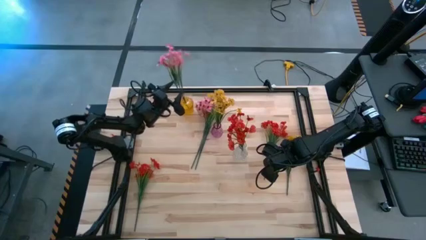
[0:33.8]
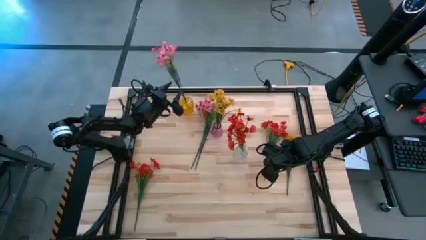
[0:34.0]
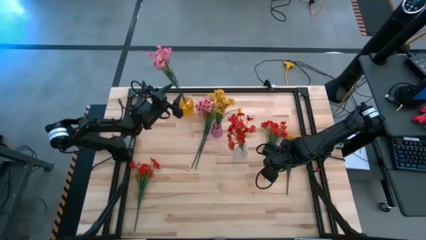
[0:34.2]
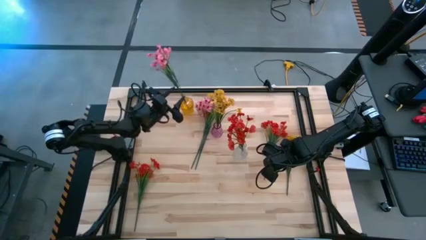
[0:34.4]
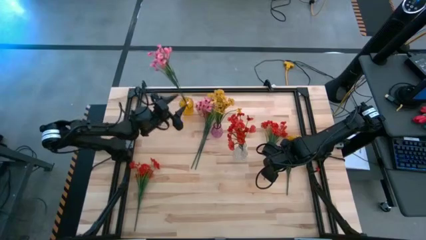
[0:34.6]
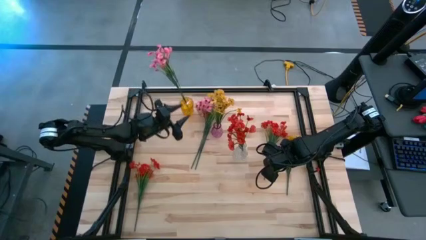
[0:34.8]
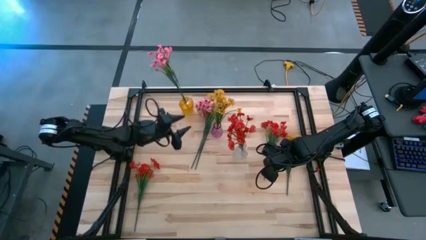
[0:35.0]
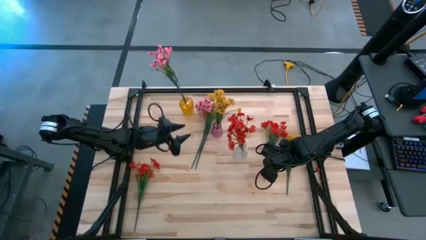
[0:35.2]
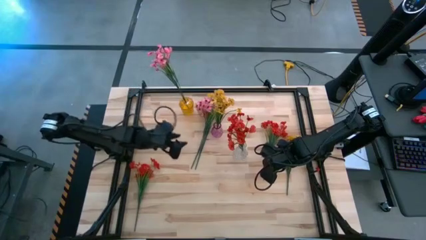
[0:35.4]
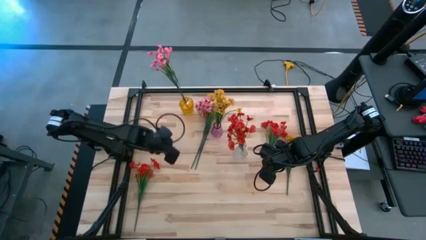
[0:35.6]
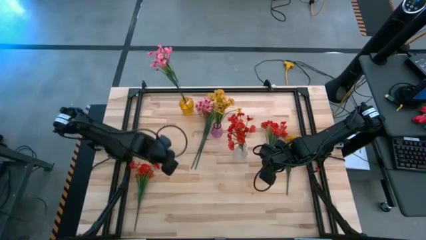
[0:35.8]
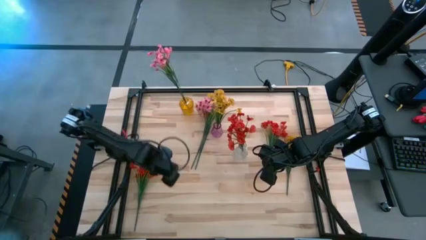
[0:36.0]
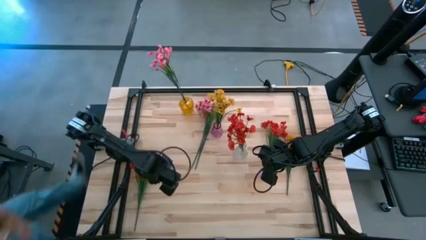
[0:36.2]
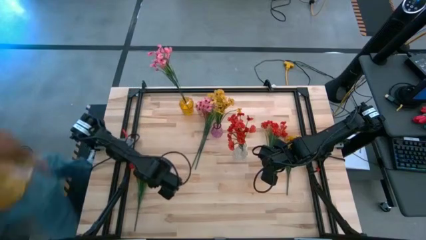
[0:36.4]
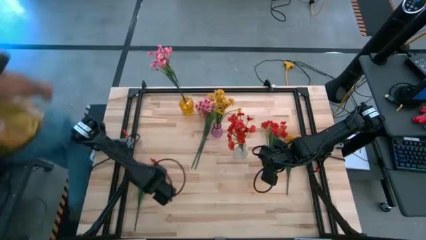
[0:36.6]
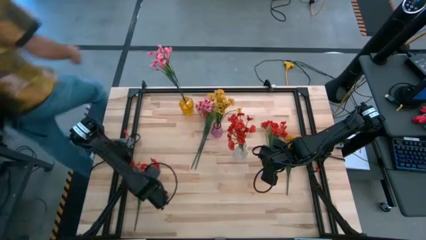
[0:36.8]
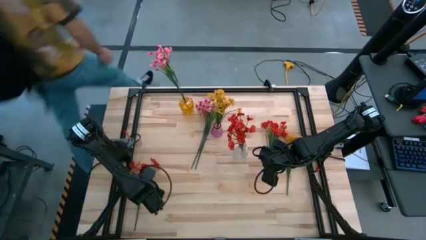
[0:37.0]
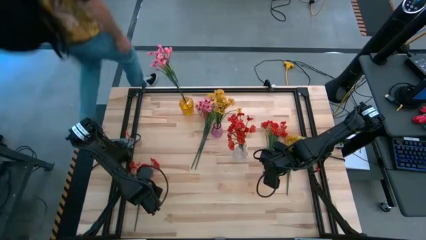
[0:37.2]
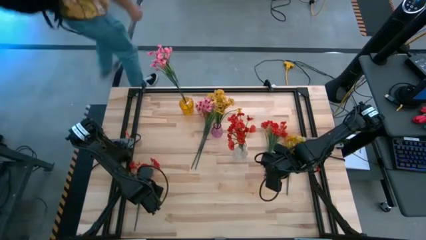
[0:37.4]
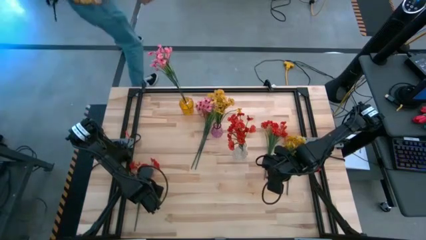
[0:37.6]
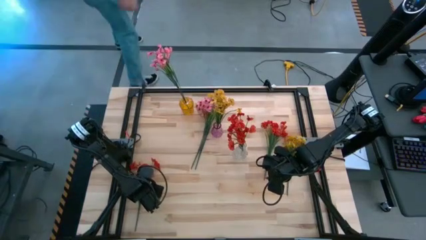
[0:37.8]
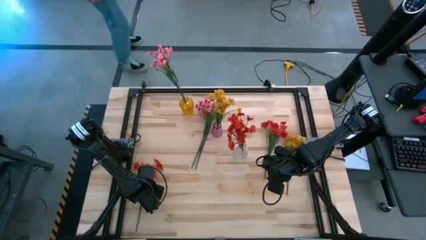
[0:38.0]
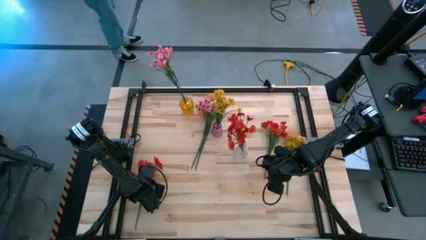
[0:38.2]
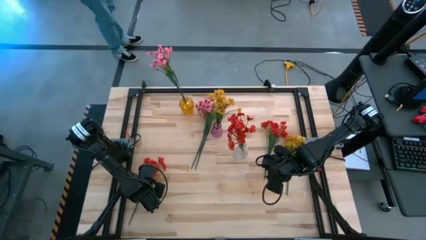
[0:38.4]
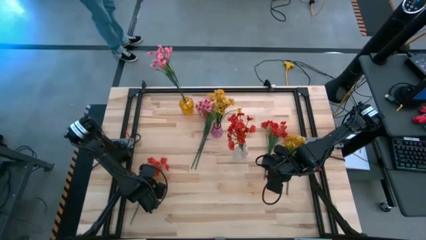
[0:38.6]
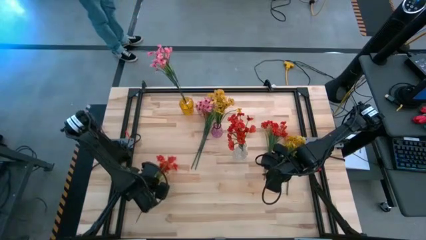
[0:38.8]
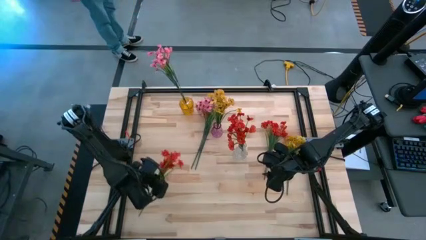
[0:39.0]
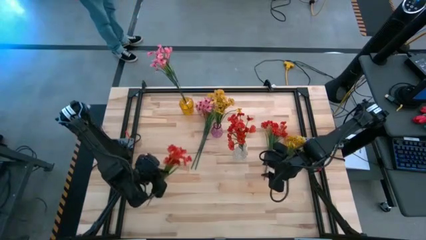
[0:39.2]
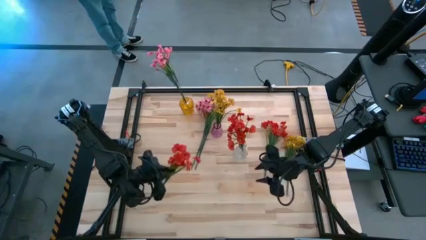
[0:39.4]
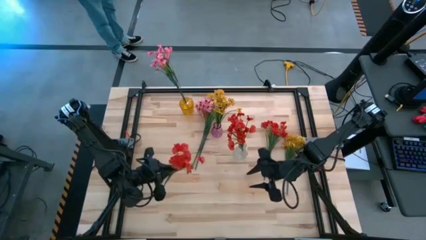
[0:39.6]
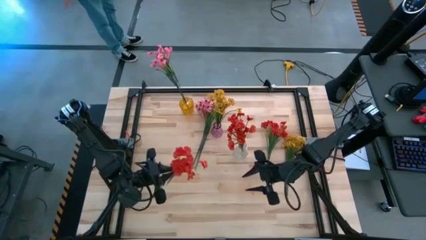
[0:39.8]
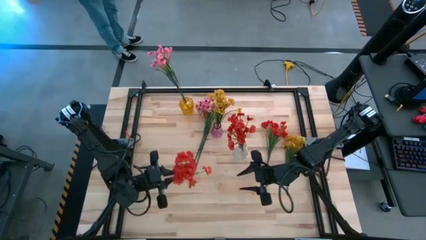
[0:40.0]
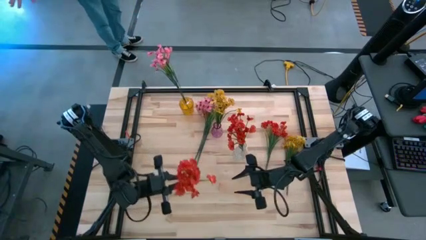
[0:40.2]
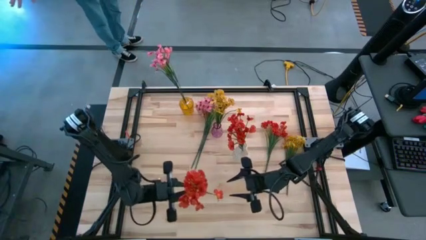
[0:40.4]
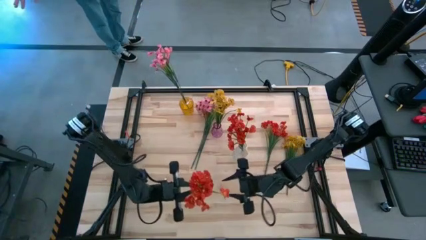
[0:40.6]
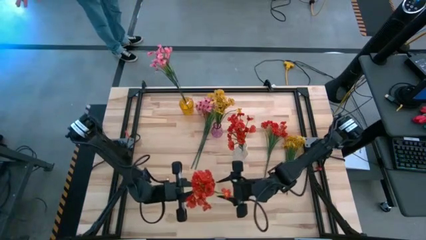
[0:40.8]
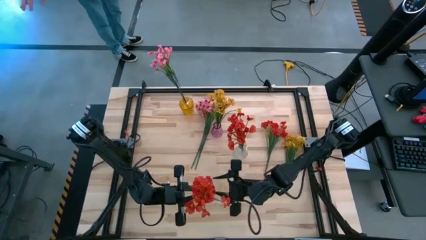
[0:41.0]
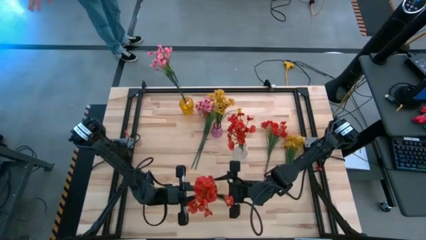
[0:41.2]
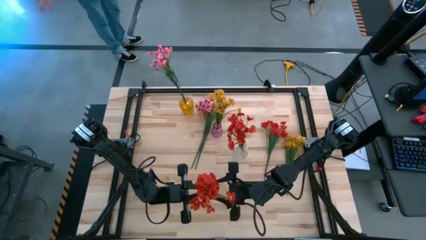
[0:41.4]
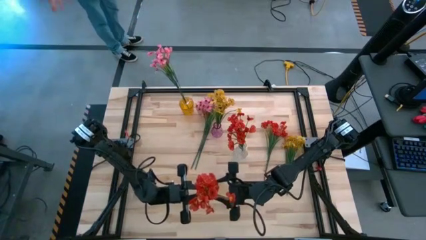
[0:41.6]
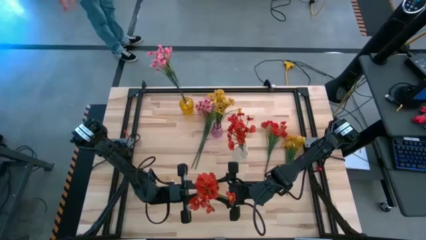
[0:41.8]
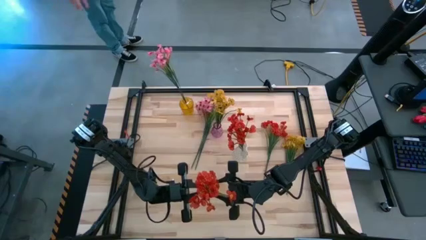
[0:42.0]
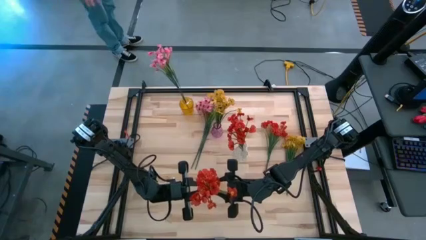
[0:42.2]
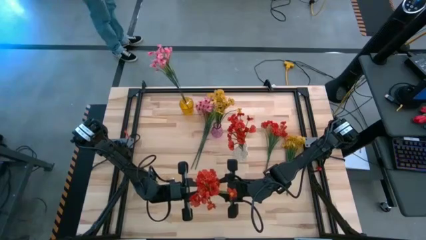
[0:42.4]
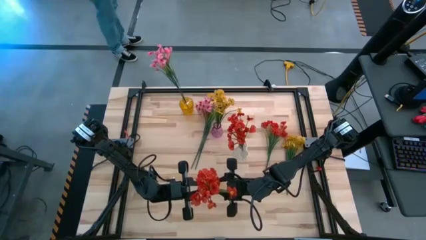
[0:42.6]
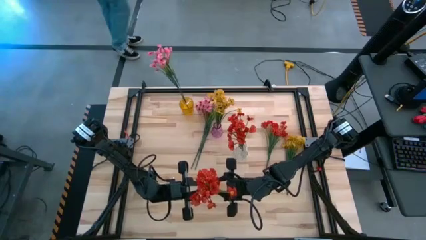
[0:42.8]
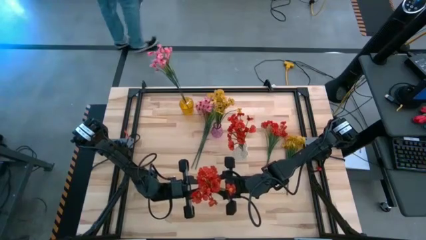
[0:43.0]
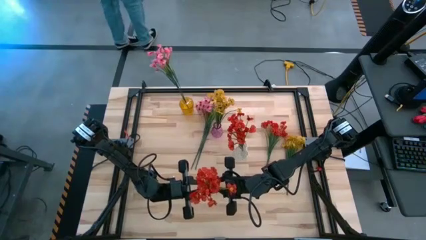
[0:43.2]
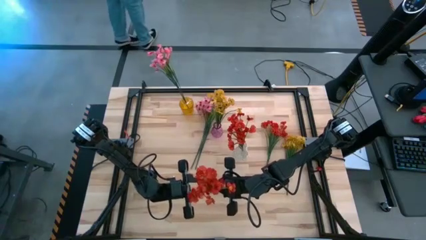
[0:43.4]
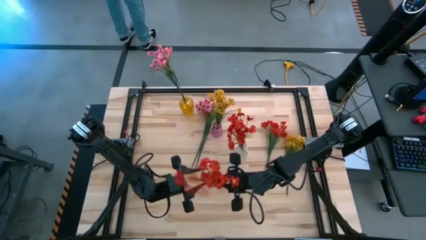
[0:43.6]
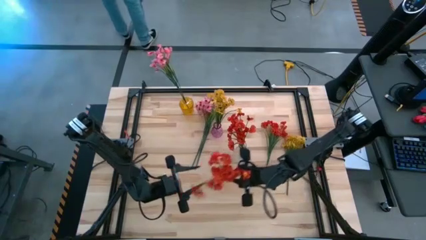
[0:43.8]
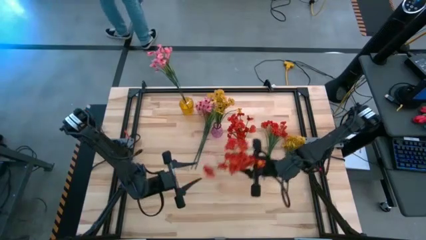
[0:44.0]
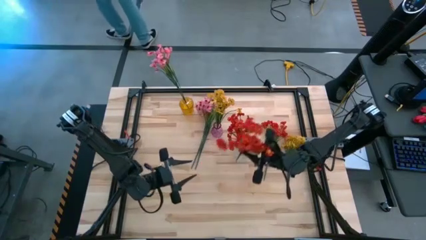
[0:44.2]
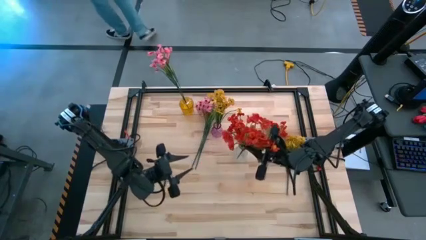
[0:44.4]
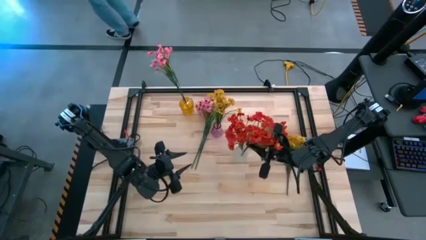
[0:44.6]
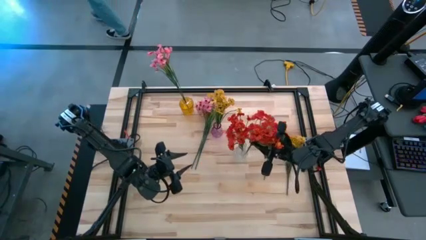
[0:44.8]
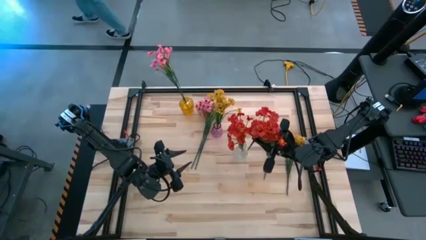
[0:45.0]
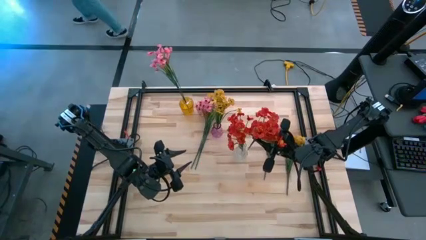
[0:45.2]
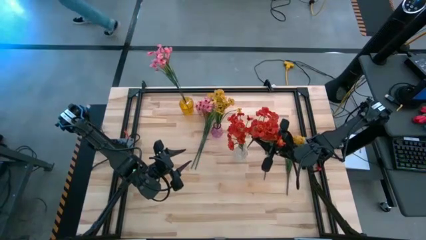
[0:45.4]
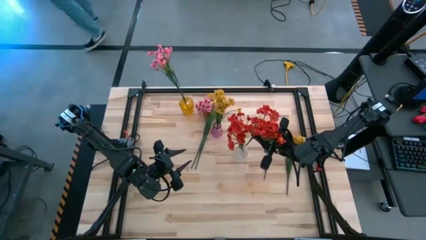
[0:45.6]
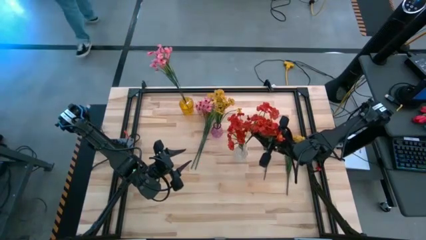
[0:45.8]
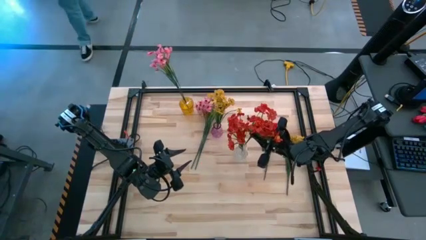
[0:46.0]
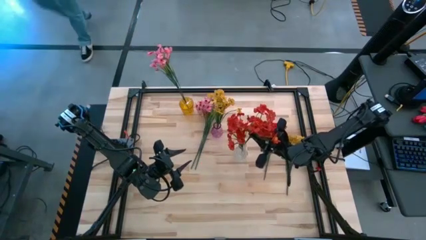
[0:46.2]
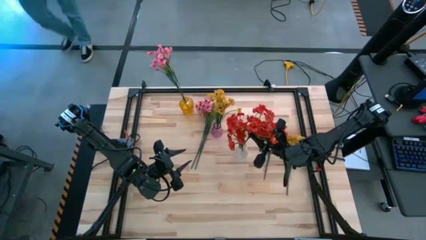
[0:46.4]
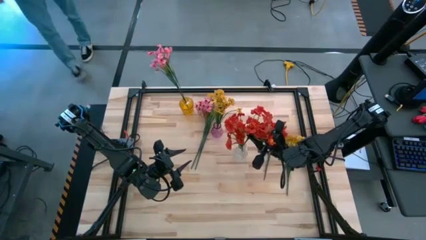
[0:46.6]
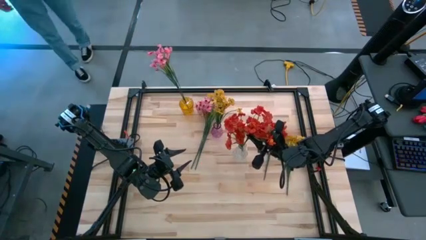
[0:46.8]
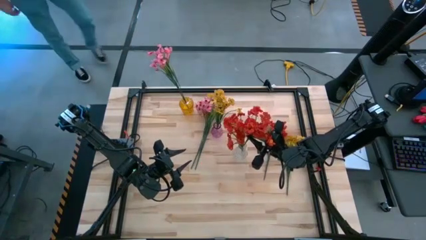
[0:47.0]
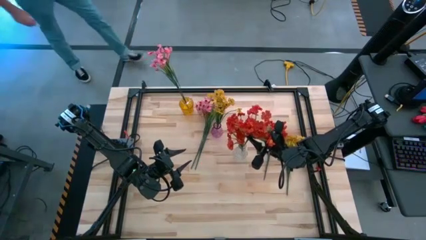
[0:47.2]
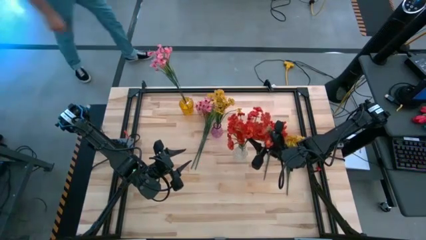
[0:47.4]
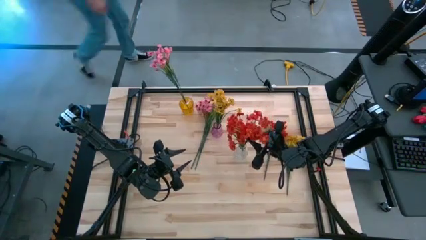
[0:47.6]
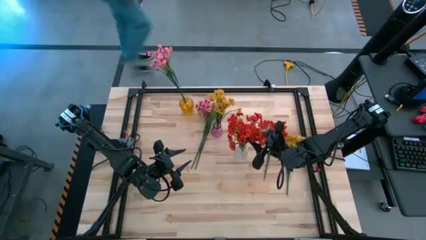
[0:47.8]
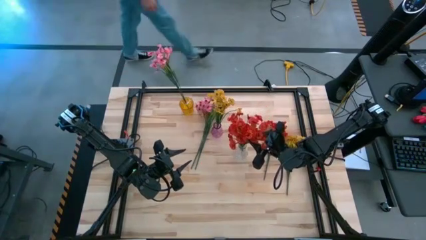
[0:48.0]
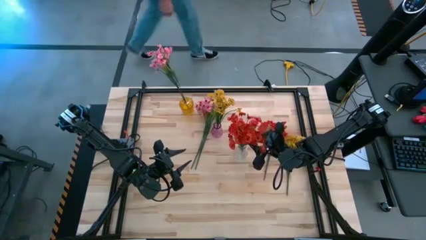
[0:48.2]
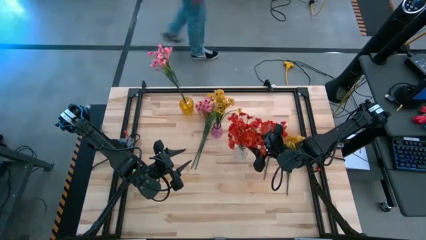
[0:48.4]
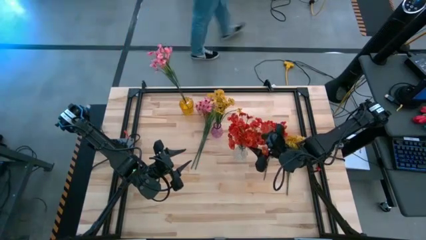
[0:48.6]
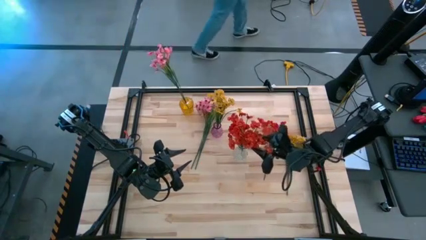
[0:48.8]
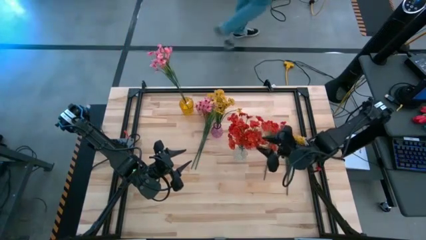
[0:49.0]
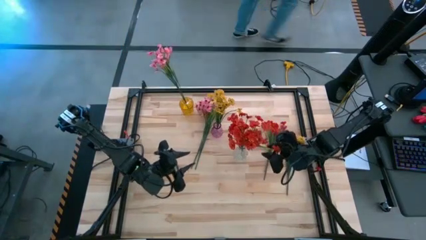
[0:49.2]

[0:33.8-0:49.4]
Task: Sort flowers into vase by color
Put the bottom red flowers into the transparent vase

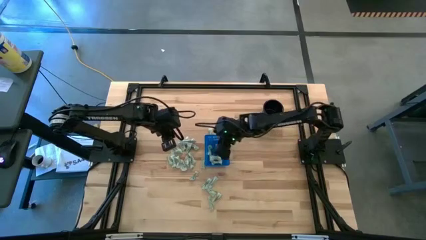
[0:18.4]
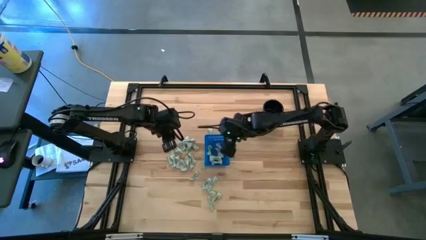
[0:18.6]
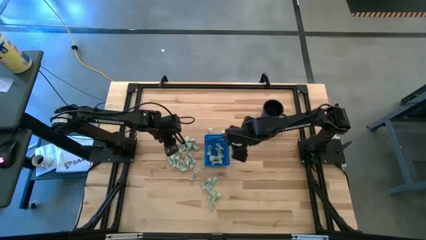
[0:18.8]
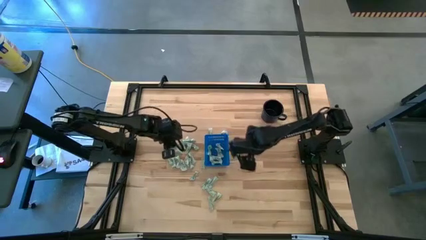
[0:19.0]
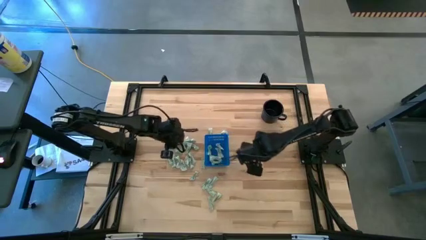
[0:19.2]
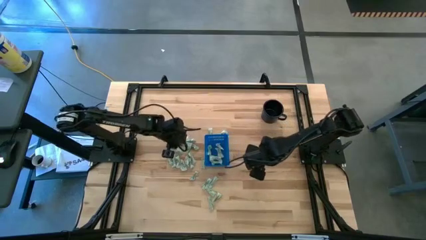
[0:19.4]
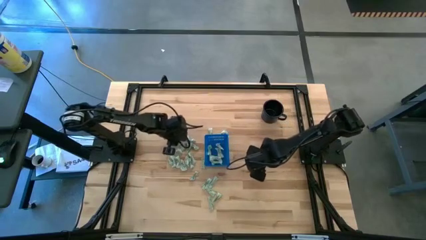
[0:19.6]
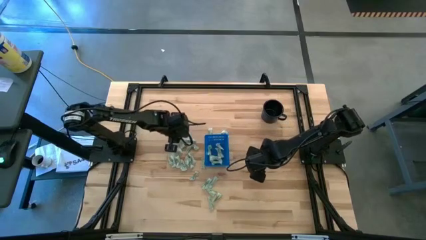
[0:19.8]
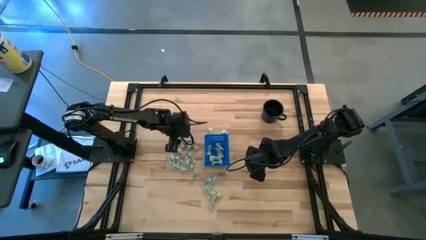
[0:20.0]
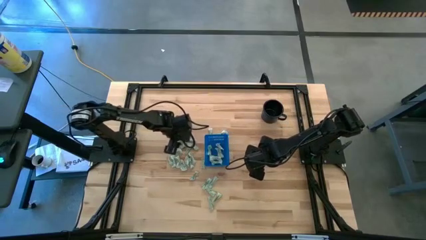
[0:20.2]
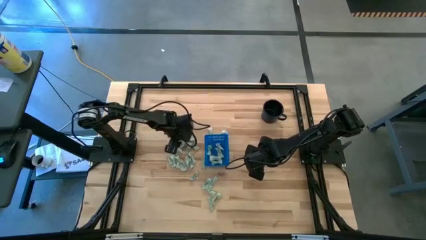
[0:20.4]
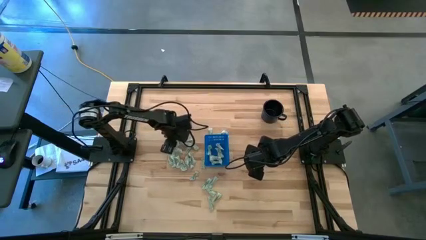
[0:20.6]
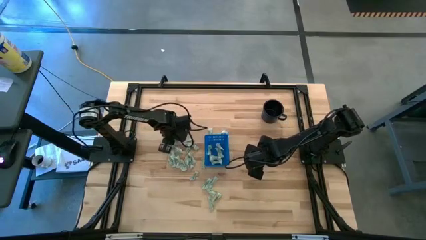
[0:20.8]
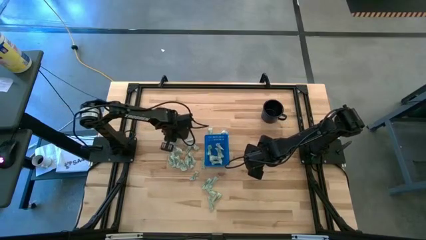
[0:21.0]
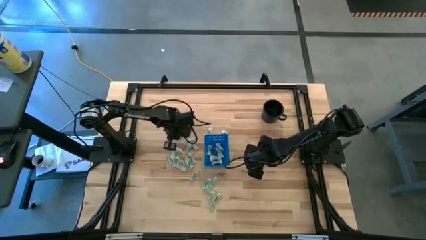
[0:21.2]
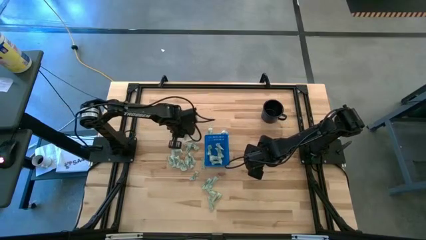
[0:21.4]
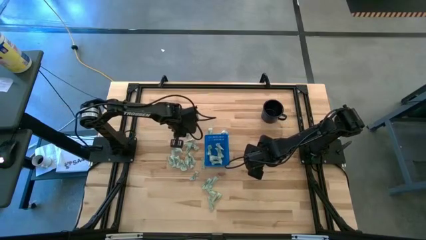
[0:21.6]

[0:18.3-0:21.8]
Task: Pick and place Stevia / Truvia into bins
Put the stevia packet into the basket
